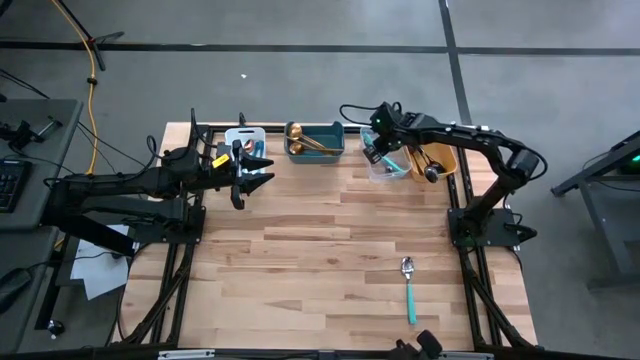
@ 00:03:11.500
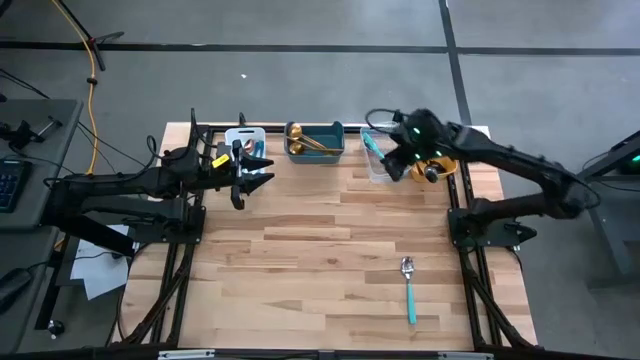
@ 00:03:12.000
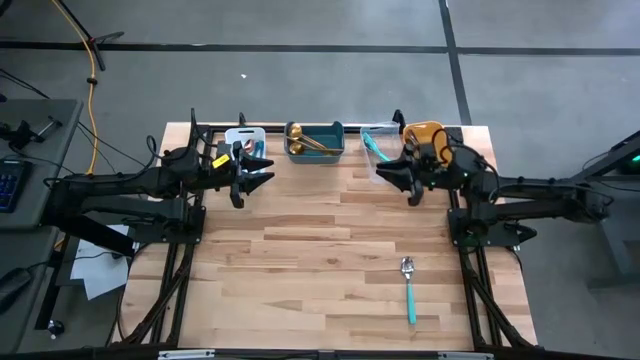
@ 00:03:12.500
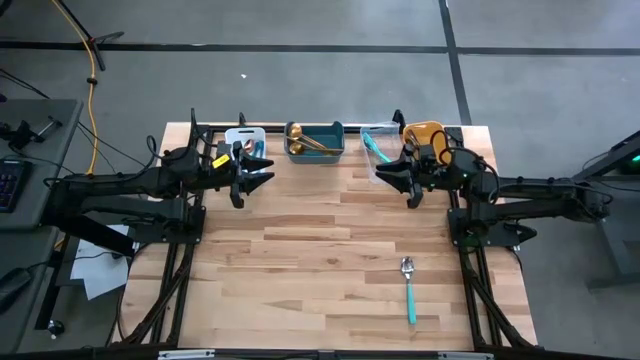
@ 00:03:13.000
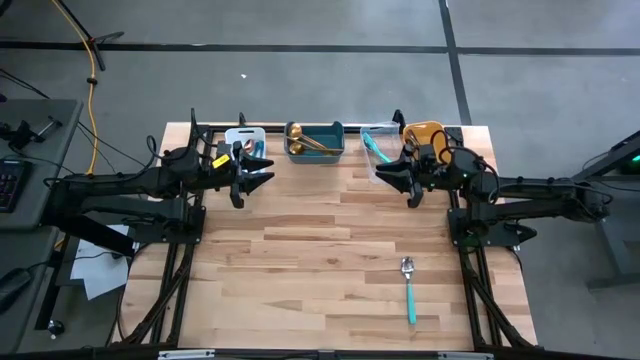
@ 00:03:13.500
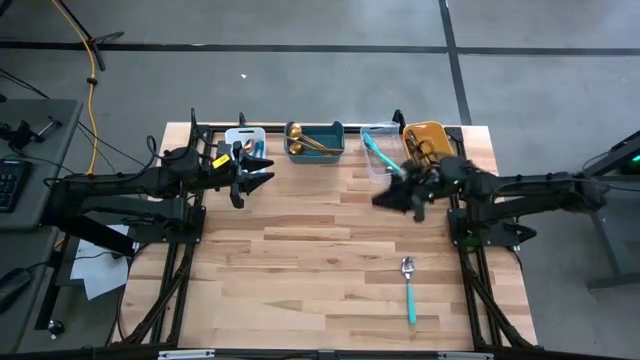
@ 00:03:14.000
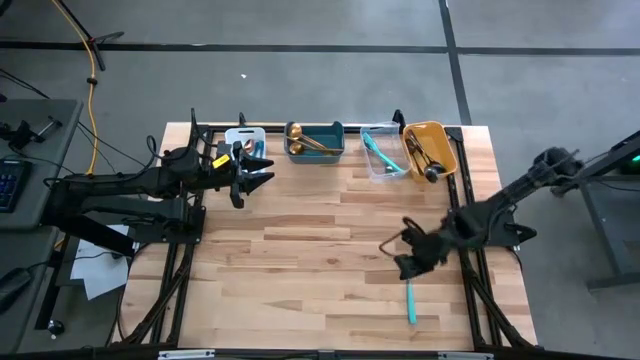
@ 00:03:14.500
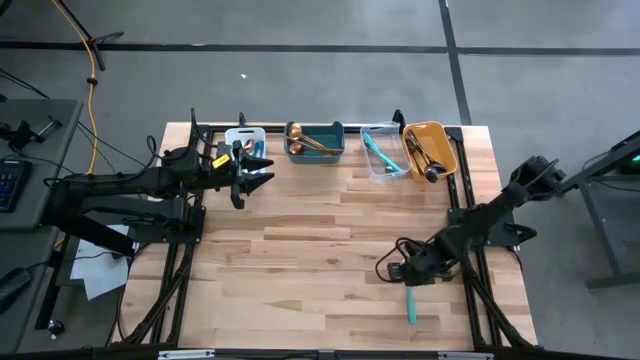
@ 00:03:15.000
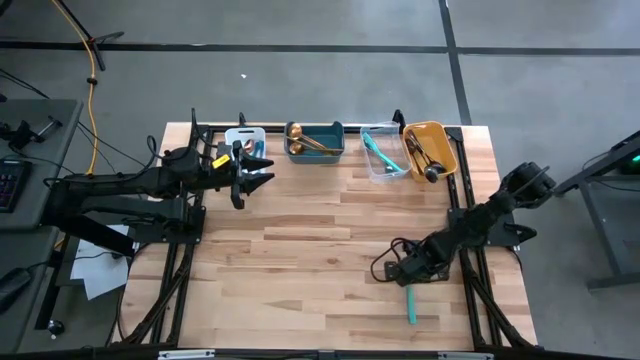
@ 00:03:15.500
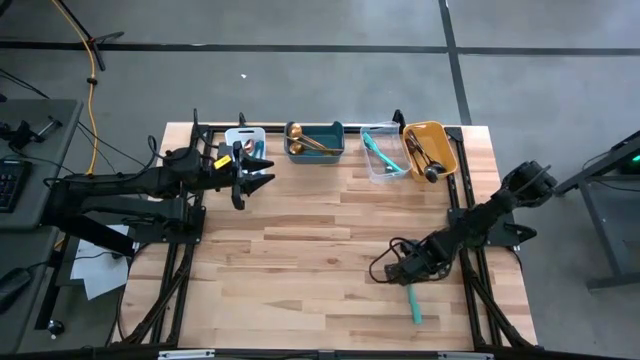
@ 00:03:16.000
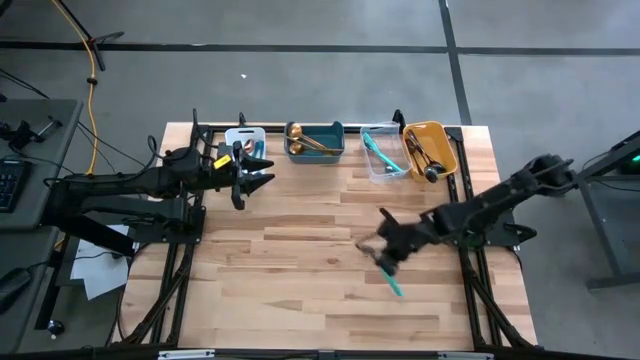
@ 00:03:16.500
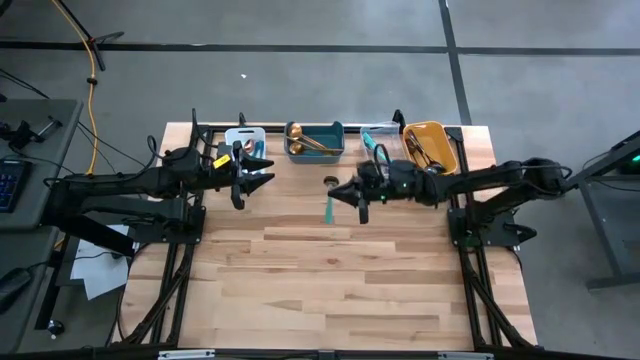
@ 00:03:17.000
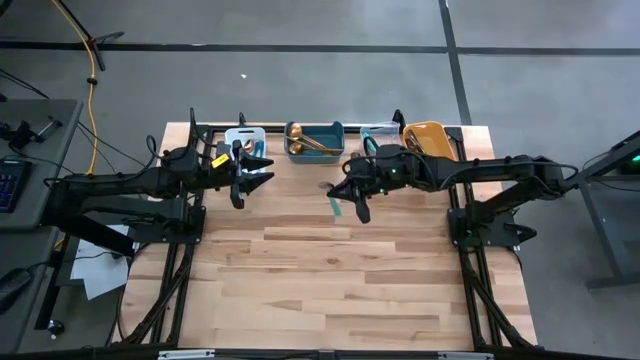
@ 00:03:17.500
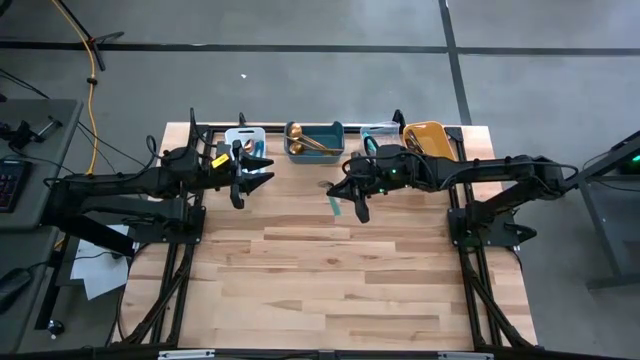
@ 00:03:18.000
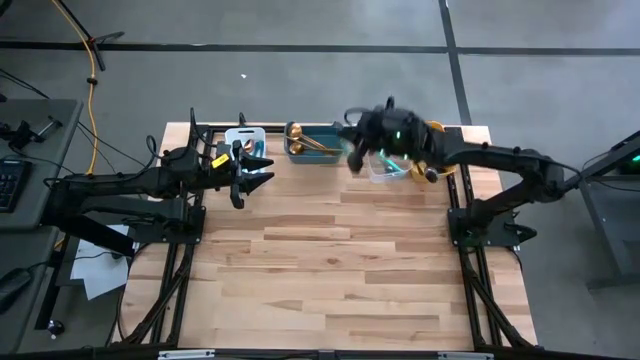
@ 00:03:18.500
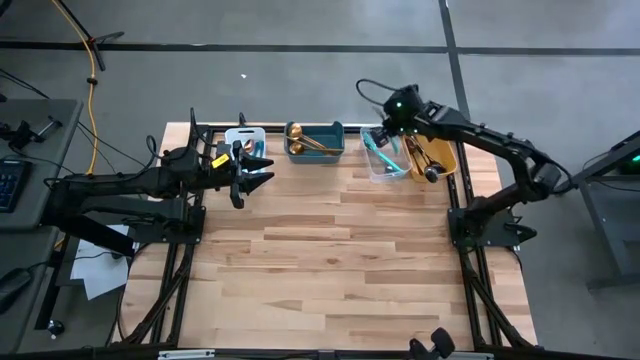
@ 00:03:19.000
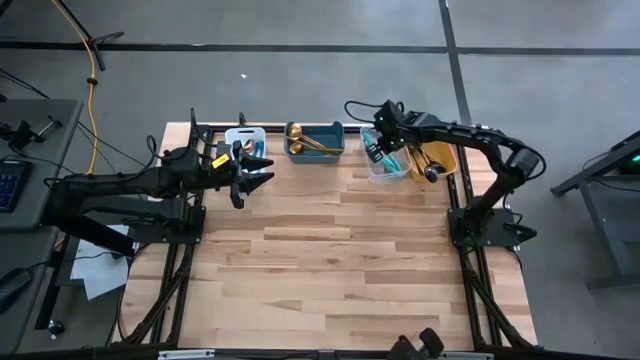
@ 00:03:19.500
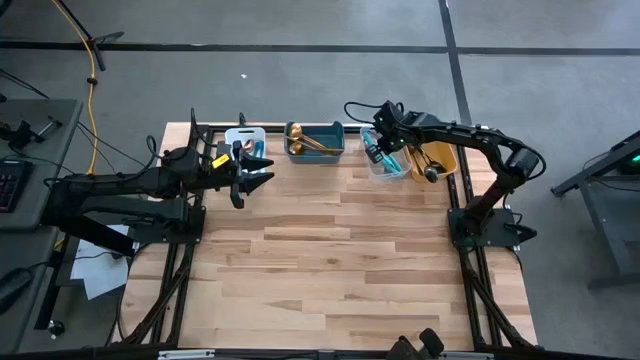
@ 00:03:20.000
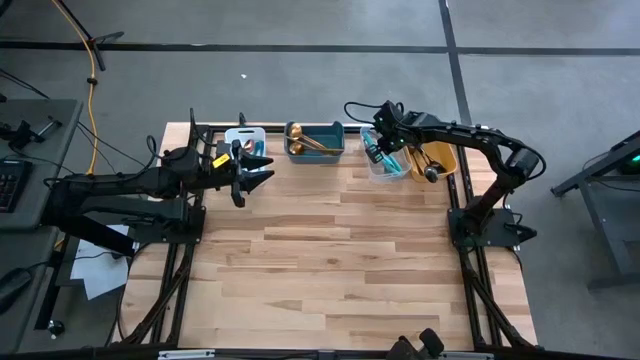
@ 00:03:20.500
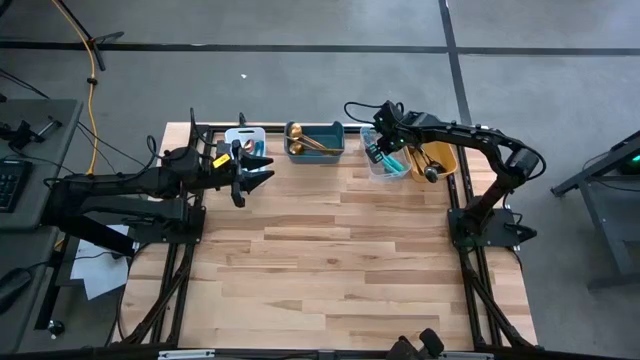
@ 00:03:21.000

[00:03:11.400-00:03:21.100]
Task: Sort silverware by color (type)
Put the light blue spoon into the transparent bin

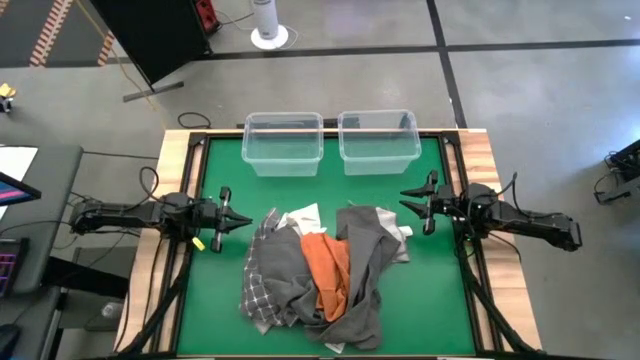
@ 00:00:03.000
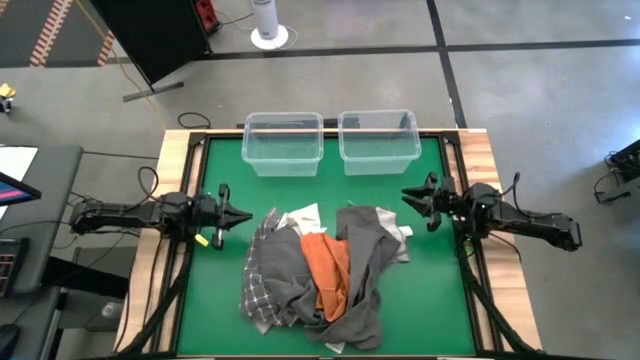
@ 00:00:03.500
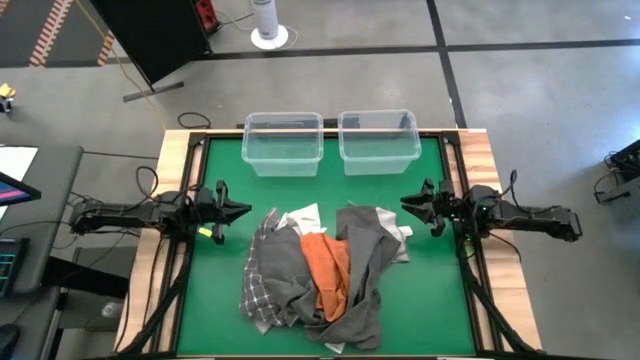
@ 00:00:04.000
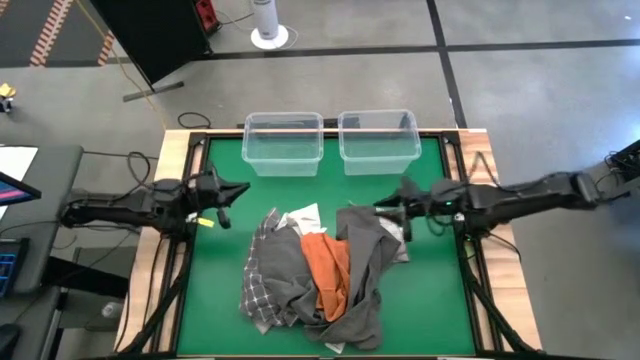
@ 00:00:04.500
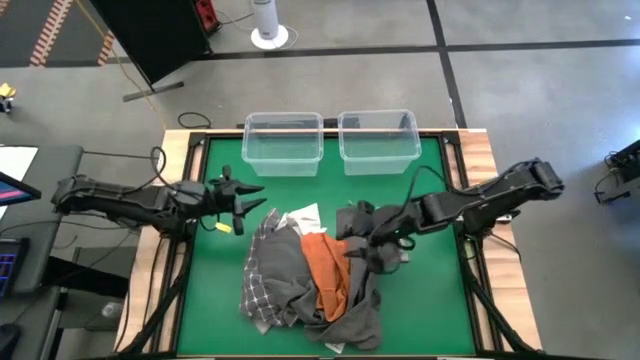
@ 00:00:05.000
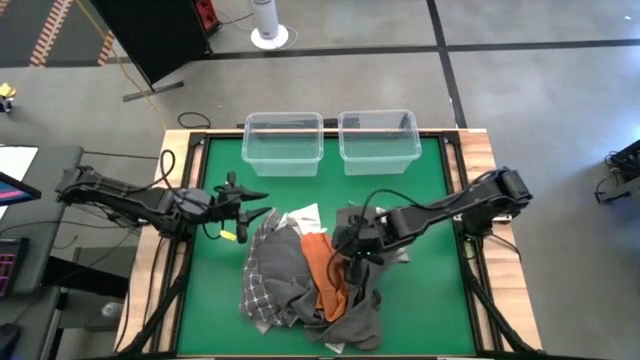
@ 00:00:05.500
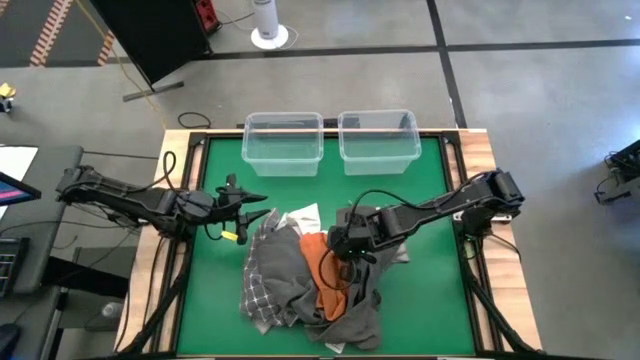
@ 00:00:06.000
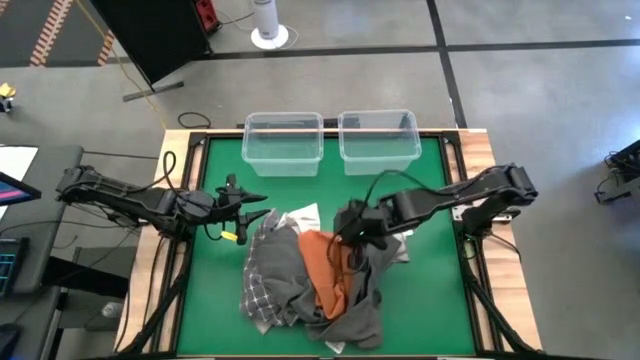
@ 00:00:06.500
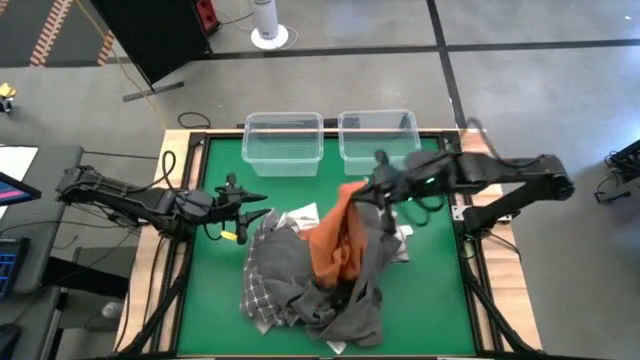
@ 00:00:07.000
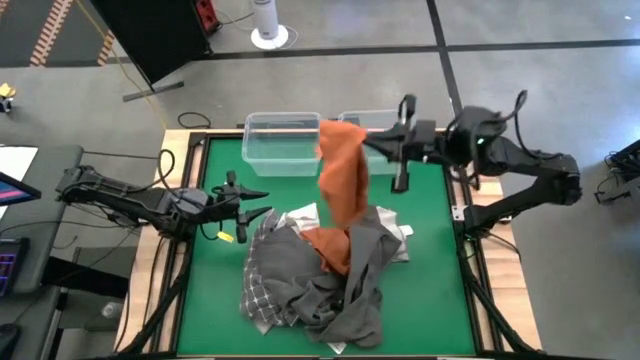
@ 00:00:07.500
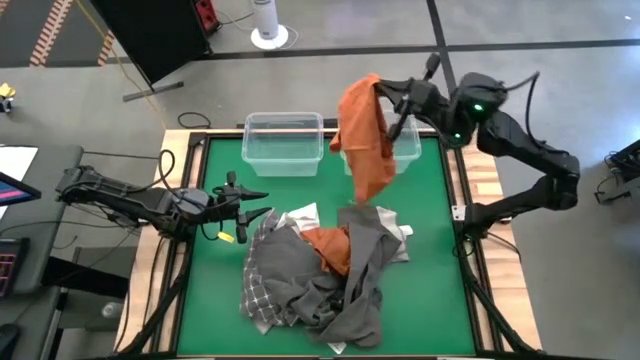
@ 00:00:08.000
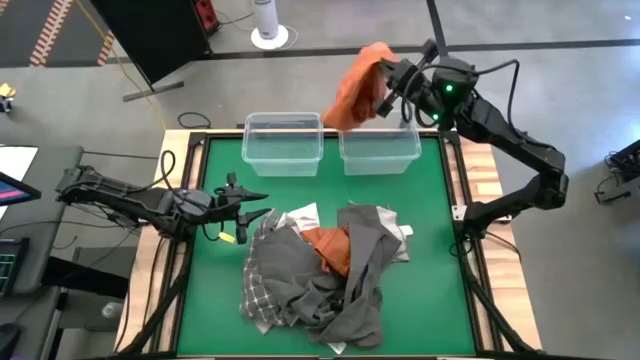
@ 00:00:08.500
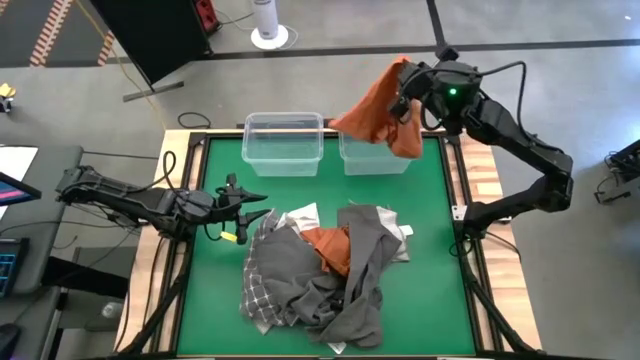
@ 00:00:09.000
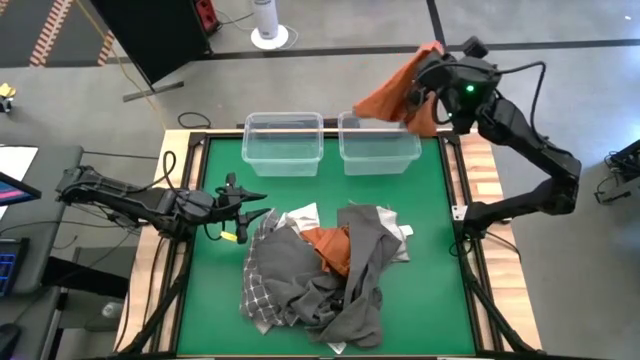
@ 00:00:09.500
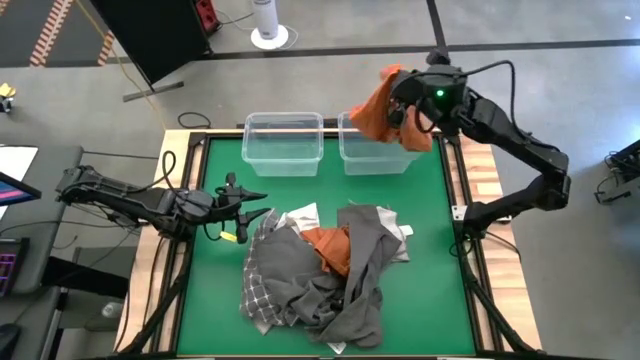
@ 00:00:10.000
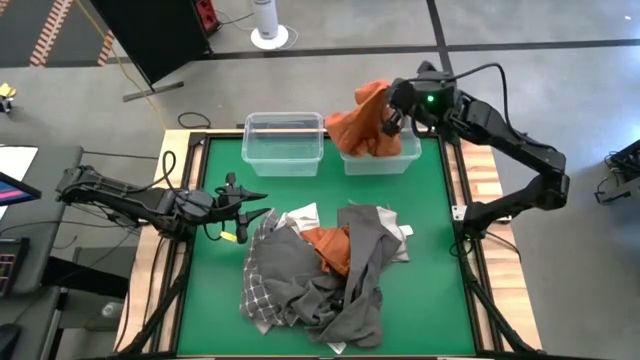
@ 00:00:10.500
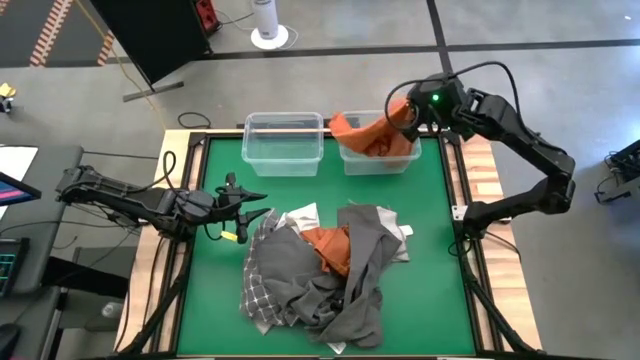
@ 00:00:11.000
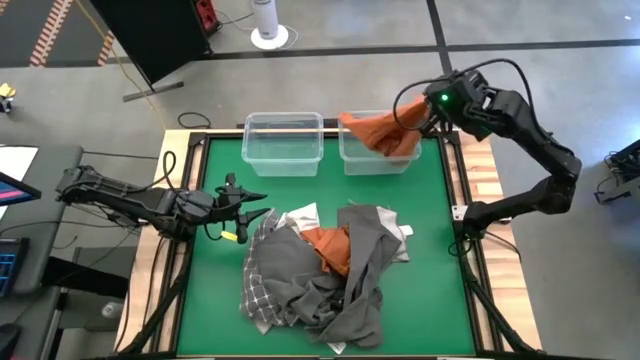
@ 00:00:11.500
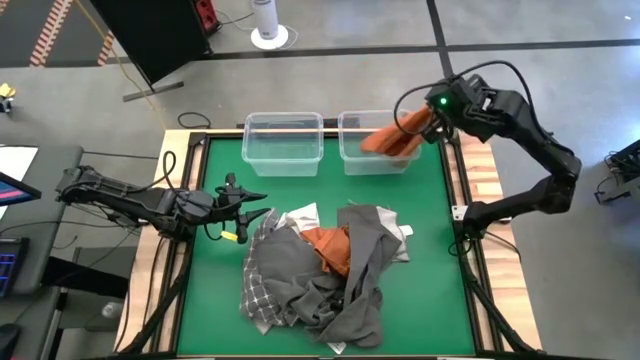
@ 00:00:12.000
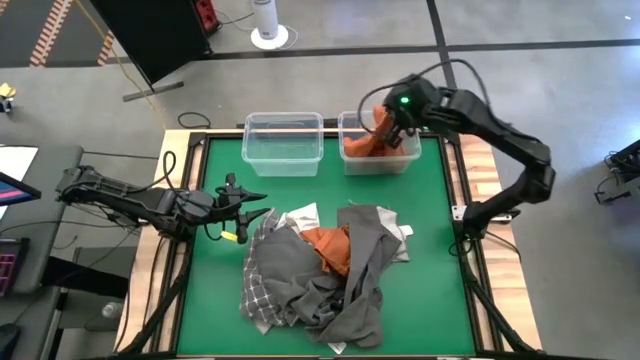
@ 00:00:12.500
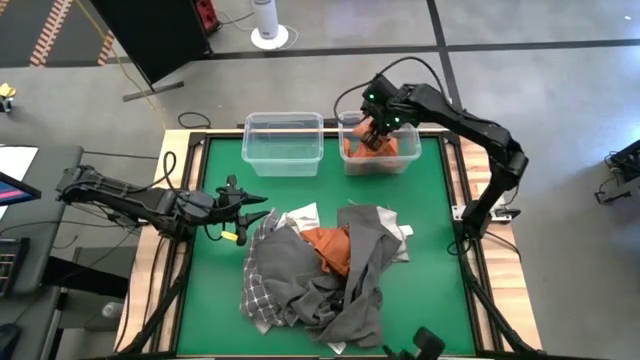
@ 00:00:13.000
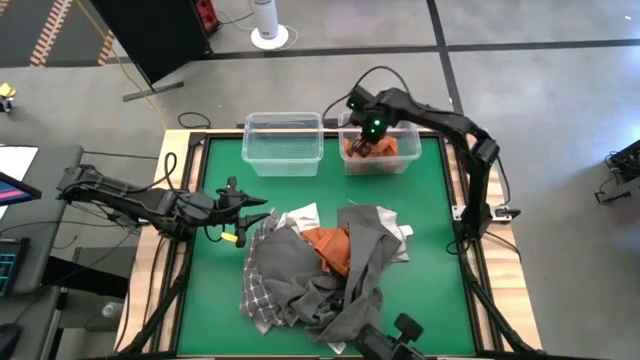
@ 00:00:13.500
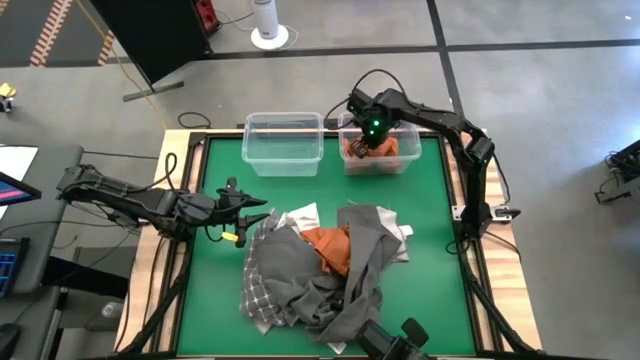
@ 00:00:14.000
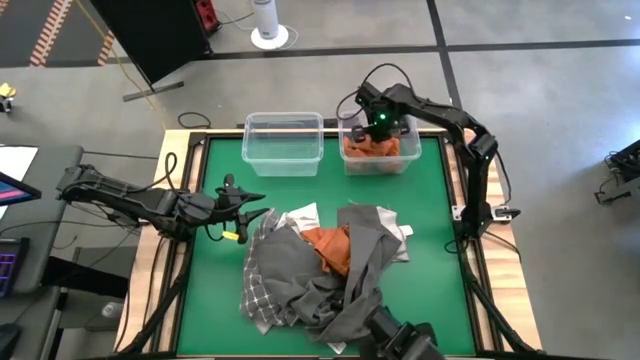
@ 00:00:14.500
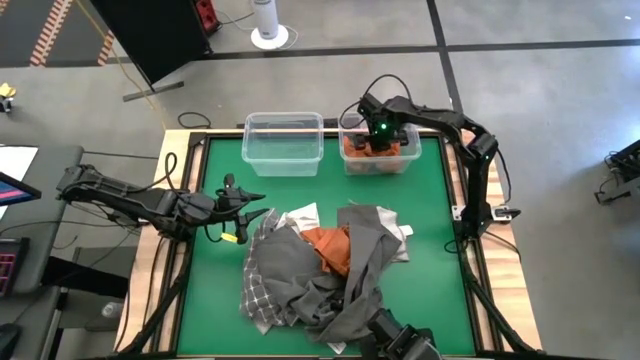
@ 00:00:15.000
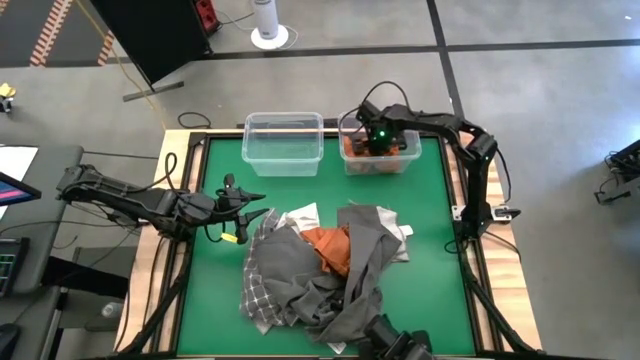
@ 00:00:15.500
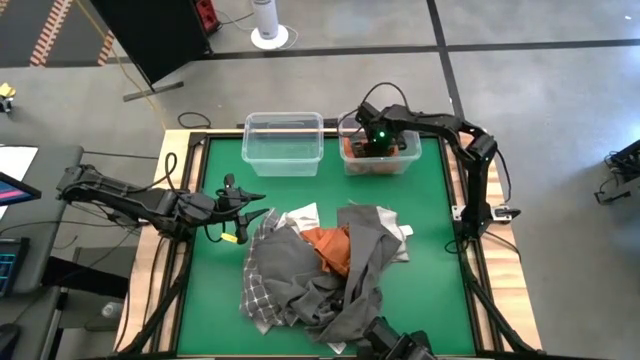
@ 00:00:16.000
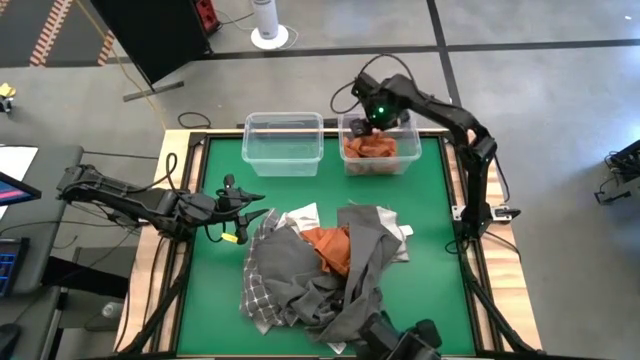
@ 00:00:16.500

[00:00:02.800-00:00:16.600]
Task: Sort towels by color in basket
Put the orange microfiber towel into the right transparent bin
